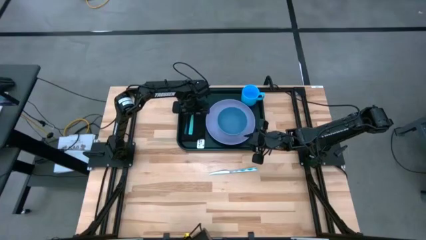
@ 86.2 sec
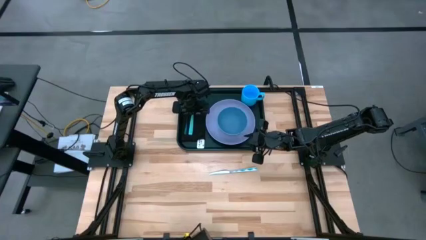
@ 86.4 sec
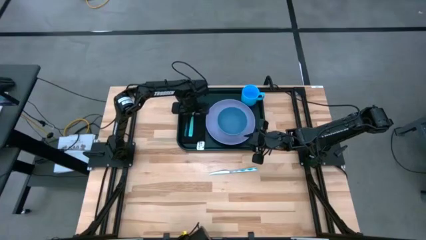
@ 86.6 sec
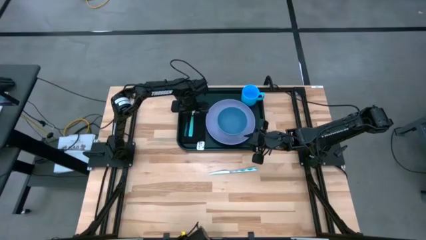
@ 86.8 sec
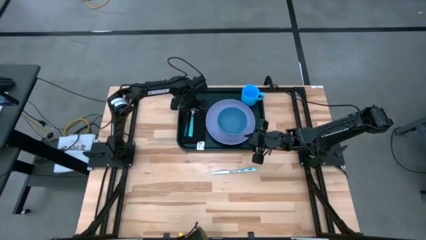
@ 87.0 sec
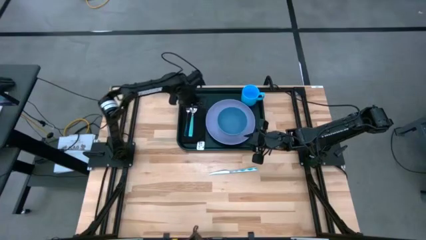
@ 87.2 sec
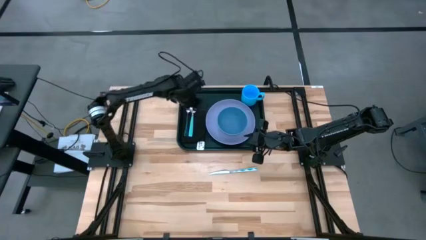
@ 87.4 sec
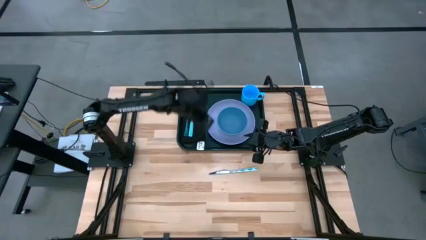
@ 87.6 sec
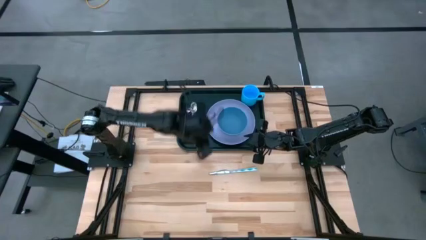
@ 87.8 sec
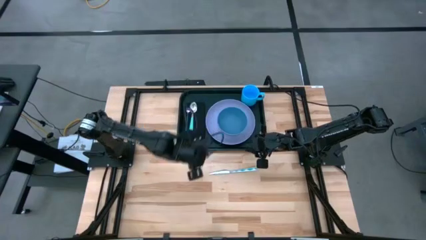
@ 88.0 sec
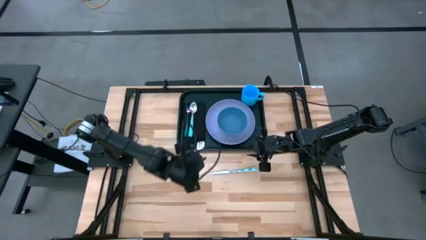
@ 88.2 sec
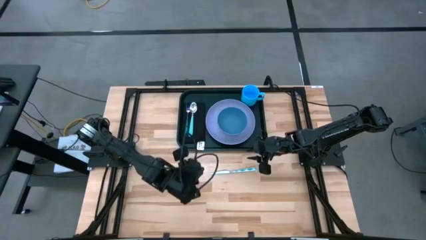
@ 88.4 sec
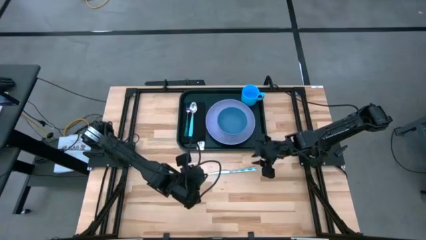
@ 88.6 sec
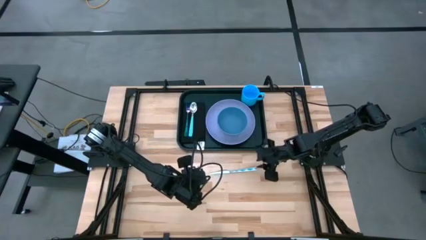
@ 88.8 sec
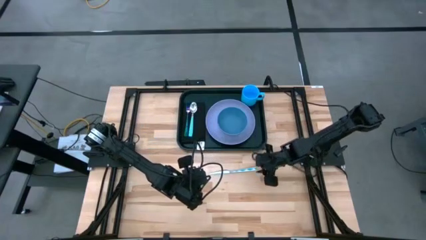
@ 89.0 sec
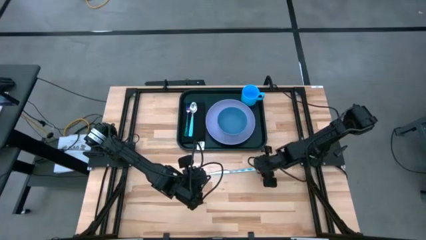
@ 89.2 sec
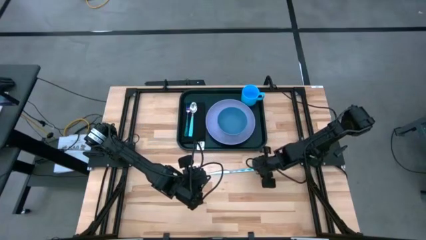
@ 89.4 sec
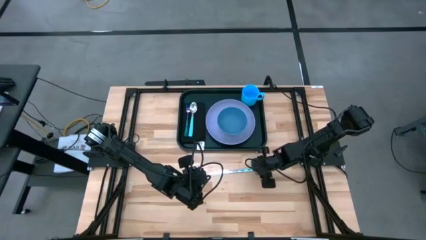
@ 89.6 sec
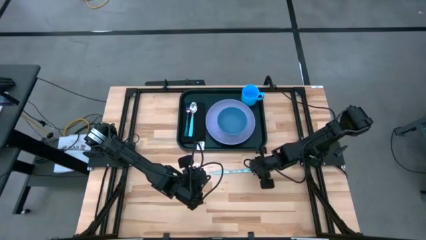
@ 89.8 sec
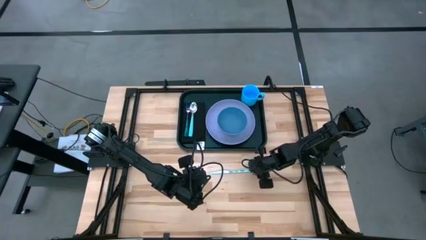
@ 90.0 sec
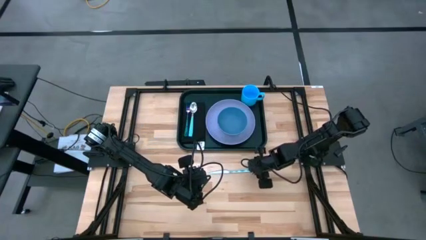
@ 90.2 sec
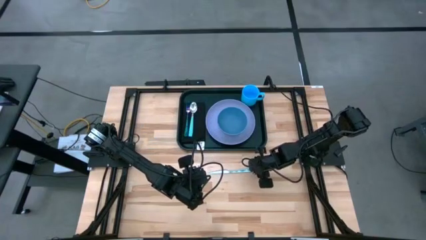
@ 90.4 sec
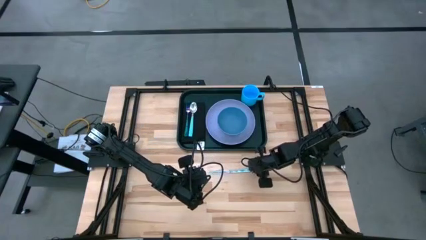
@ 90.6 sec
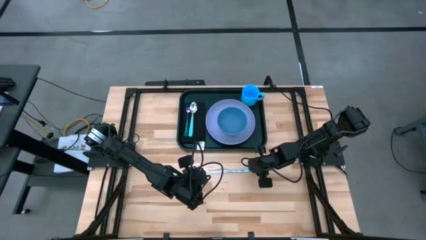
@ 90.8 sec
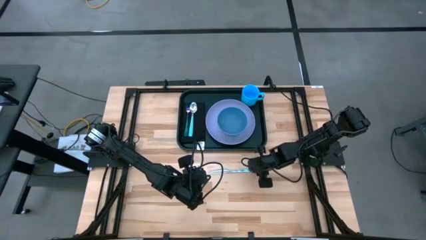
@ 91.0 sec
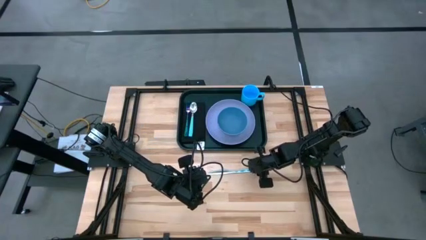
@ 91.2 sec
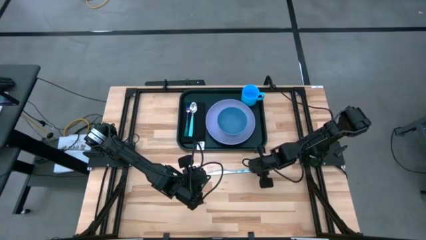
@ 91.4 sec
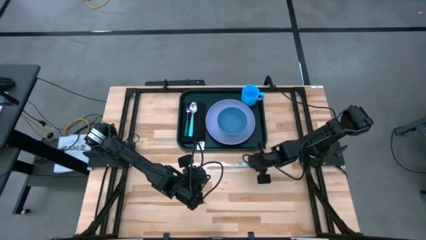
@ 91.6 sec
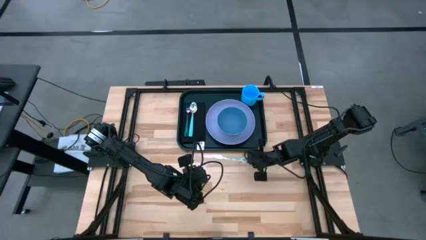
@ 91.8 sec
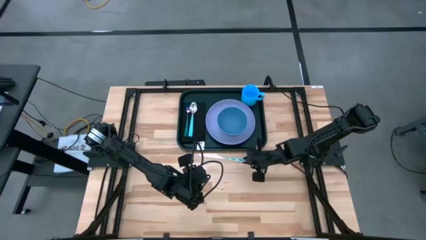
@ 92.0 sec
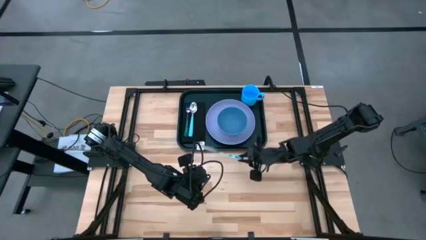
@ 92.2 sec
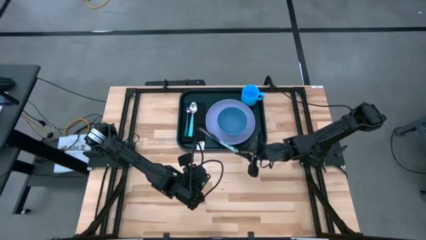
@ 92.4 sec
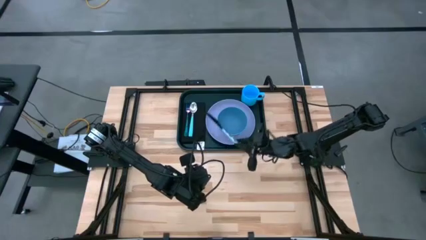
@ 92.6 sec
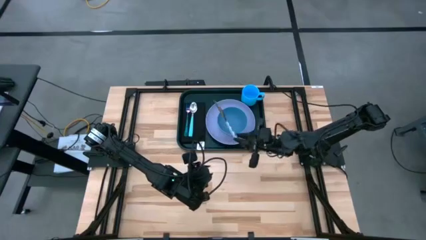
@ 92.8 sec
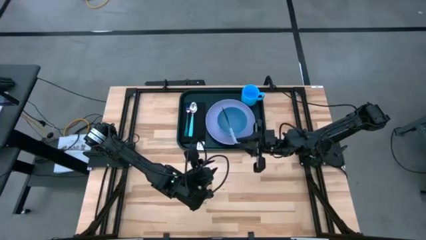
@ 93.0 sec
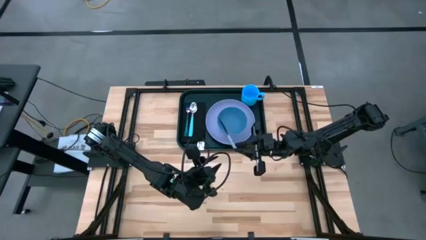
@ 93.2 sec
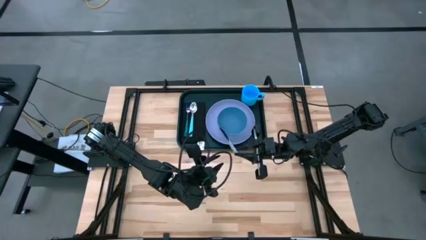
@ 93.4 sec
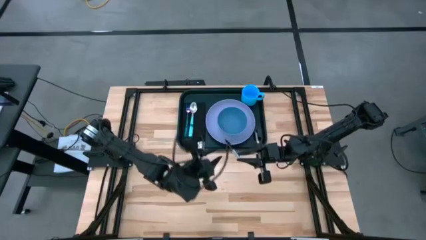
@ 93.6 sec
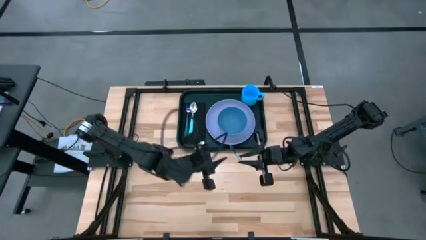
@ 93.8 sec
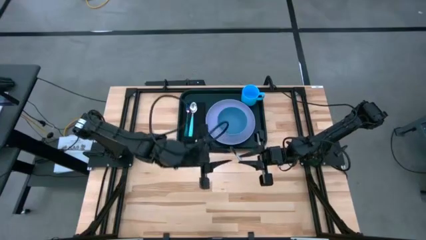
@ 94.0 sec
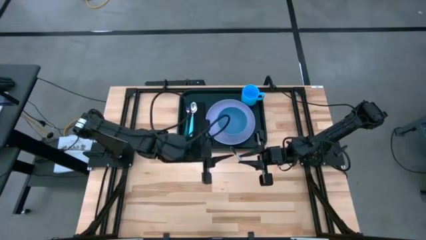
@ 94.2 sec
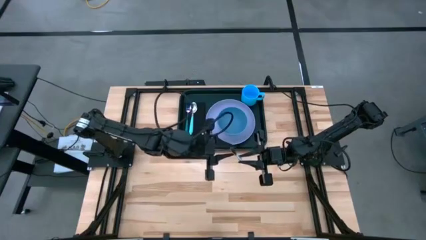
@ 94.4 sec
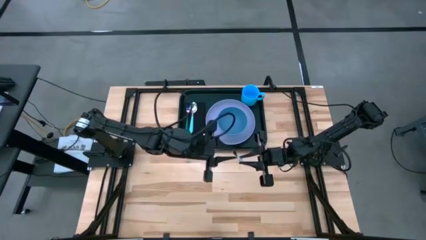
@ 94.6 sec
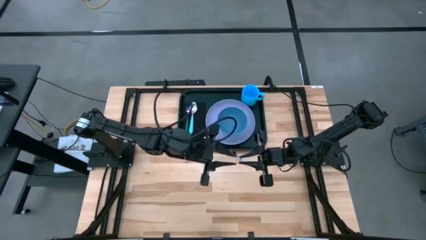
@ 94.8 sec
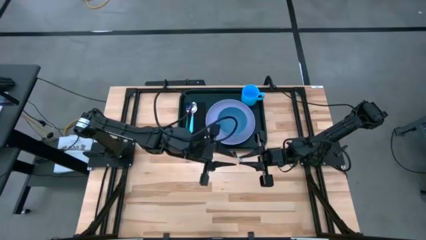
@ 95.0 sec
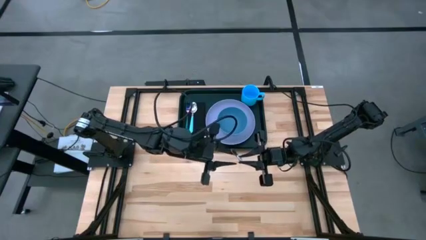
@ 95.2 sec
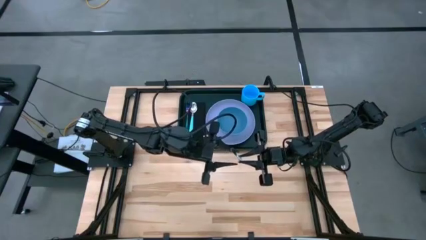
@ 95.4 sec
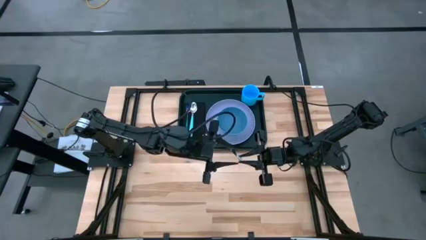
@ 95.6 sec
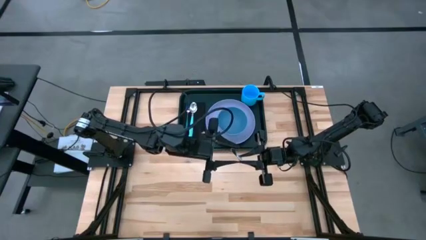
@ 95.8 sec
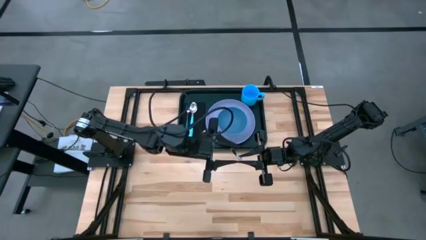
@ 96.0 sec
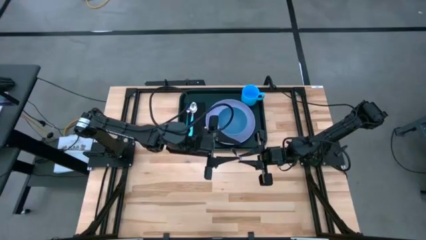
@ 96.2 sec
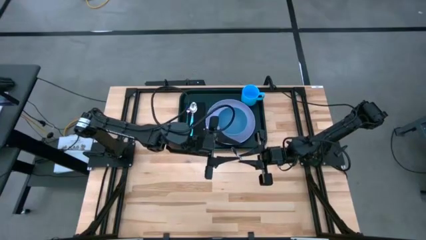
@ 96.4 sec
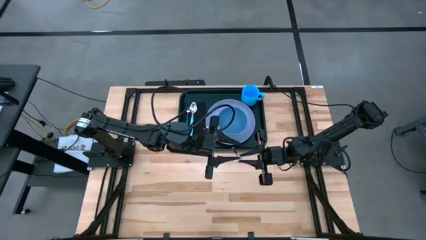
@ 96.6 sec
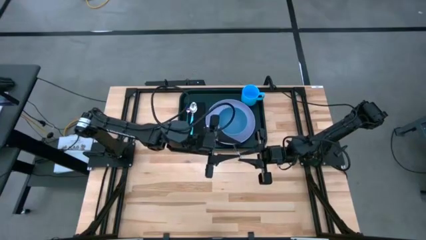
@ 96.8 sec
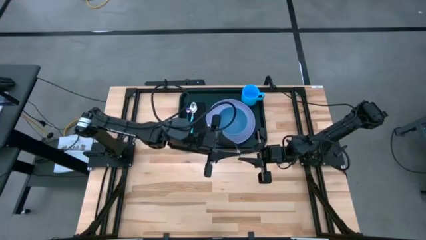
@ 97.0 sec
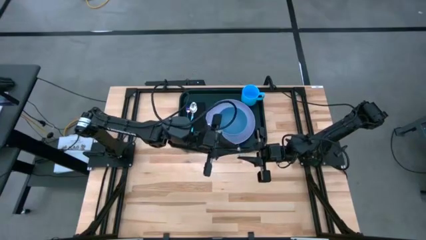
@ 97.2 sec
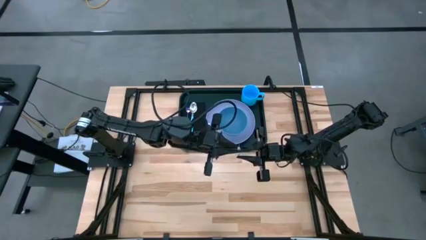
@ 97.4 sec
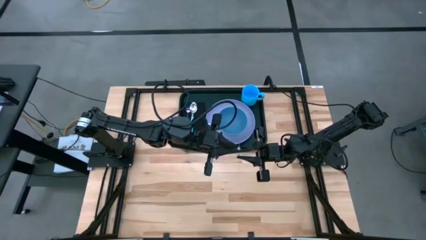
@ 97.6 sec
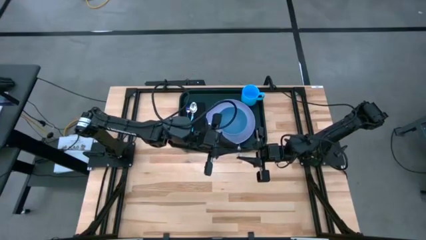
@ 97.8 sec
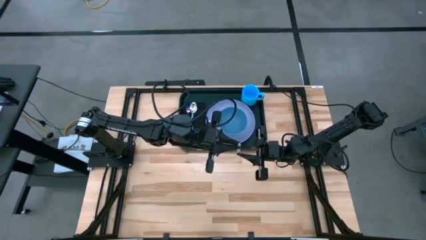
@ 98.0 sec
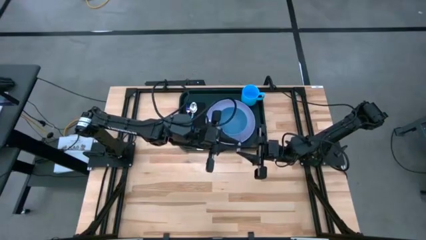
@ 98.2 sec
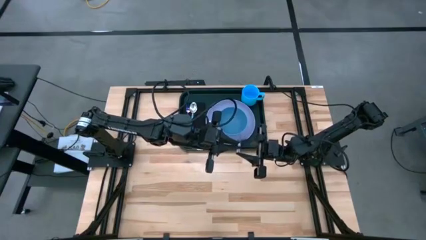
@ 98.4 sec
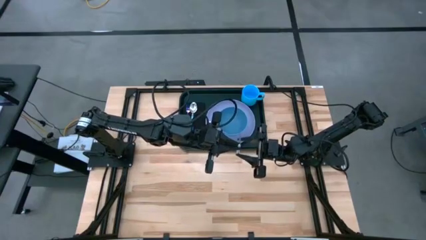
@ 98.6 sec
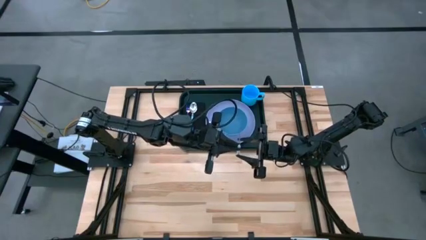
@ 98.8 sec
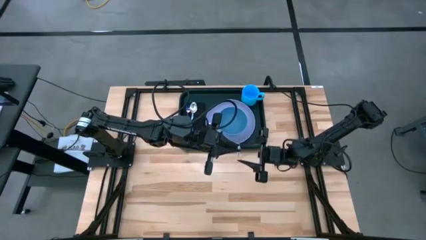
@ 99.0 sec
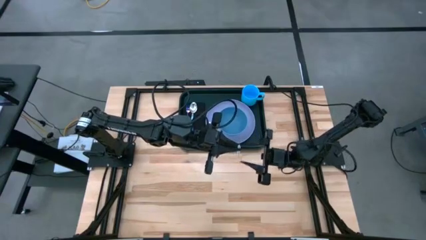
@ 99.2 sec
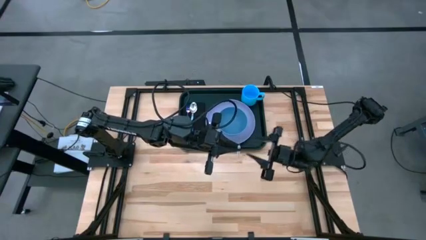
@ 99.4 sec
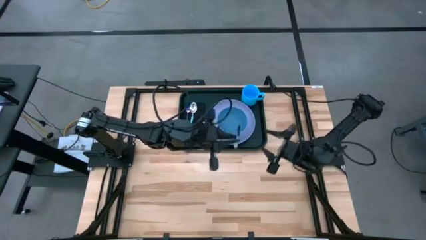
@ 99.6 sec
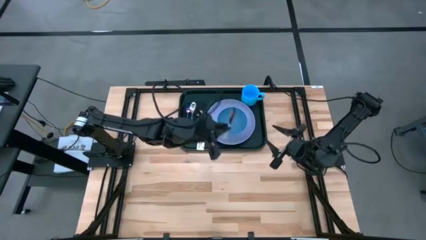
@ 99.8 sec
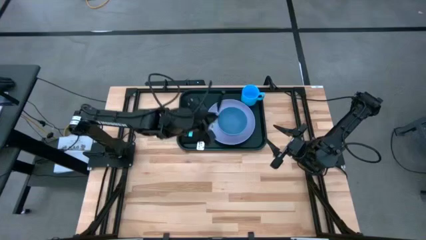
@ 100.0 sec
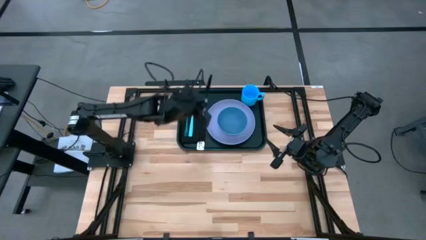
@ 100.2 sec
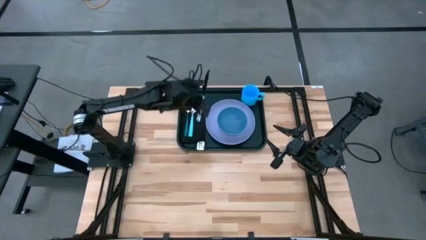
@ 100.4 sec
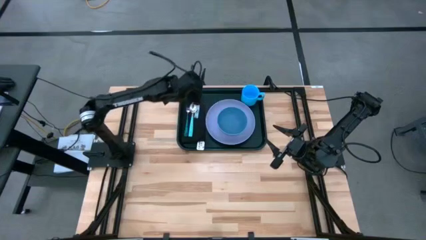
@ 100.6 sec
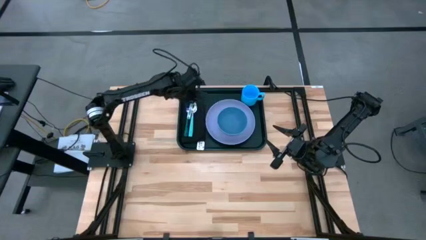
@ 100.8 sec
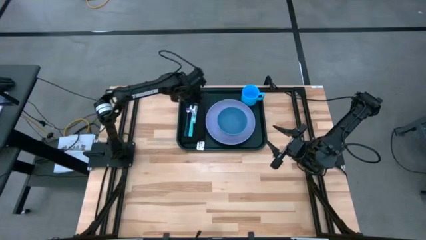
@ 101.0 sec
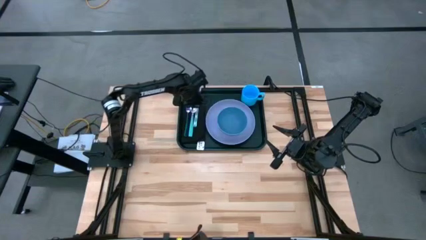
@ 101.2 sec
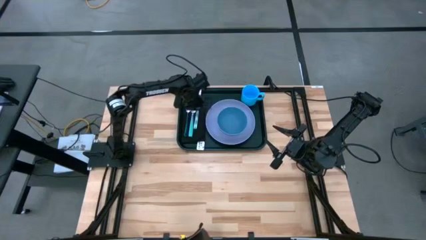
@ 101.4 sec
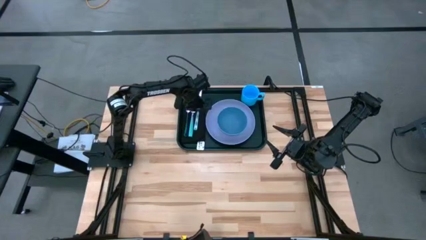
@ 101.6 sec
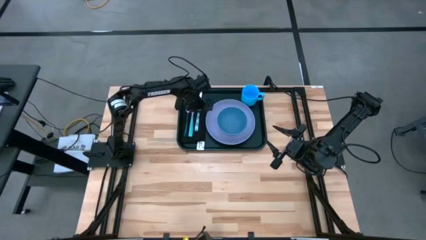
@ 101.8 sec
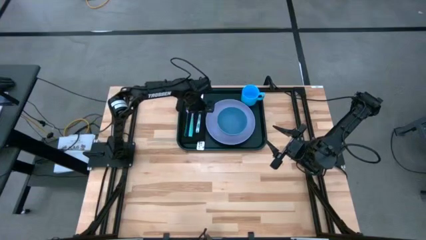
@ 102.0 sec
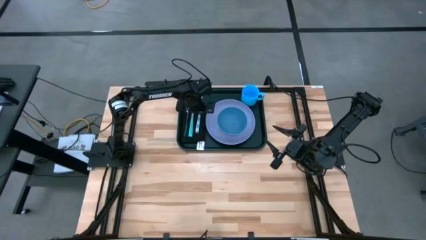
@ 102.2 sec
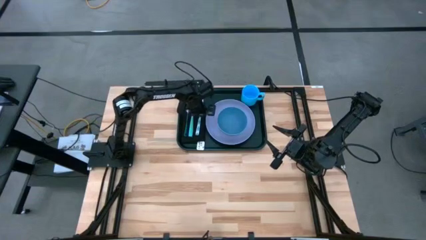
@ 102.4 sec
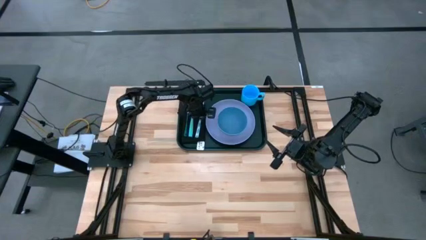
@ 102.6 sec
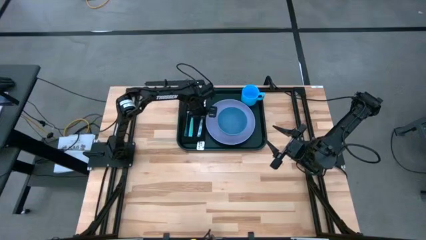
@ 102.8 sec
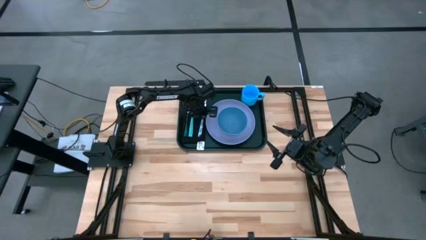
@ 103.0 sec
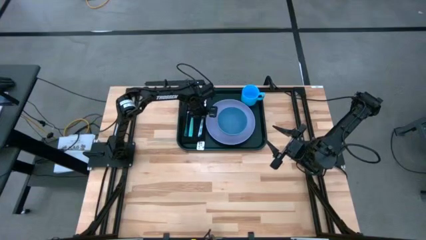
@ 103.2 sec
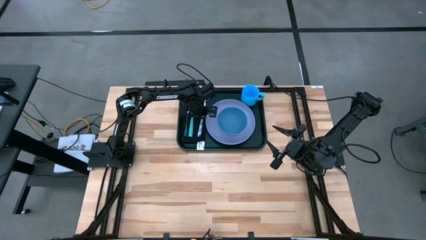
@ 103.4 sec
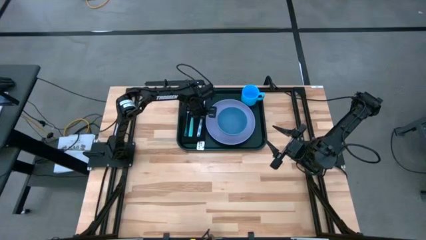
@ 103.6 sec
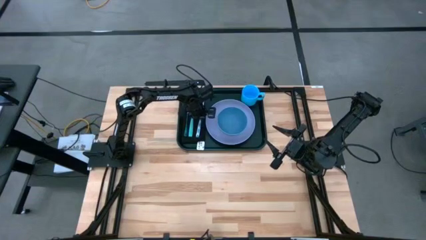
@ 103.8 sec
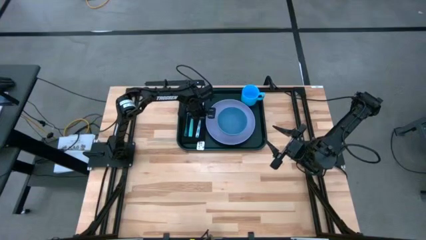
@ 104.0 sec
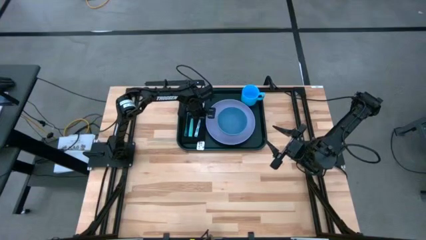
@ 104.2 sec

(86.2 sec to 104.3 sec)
Task: Set up tray
Put the white and blue knife on top of the napkin to the right of the spoon and fork on the black serving tray
